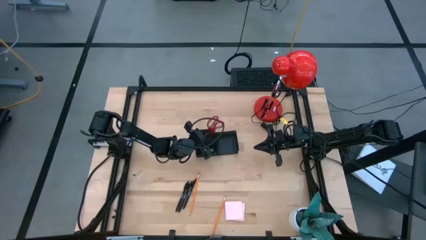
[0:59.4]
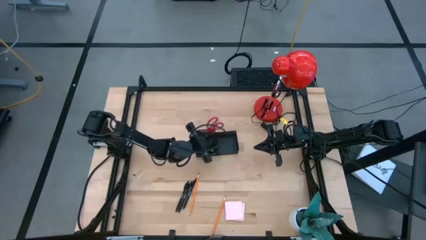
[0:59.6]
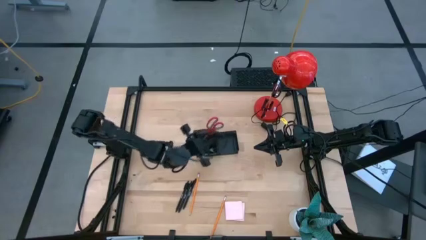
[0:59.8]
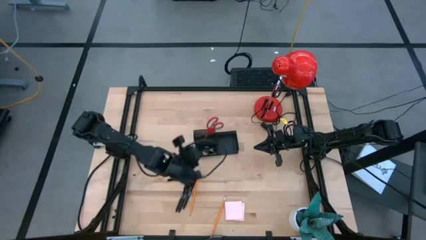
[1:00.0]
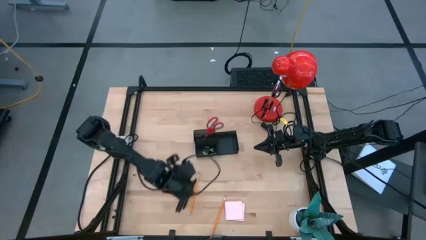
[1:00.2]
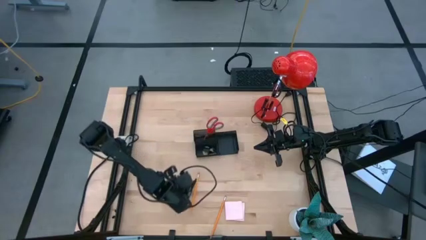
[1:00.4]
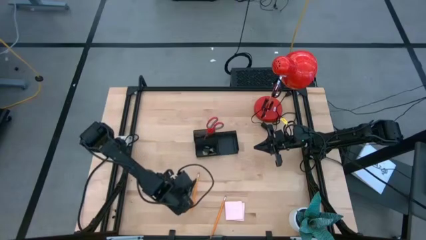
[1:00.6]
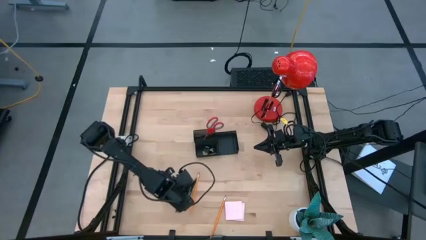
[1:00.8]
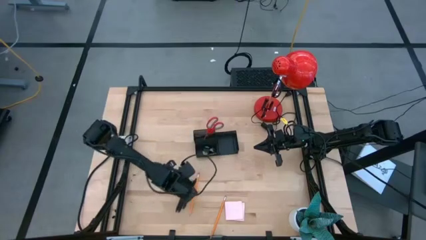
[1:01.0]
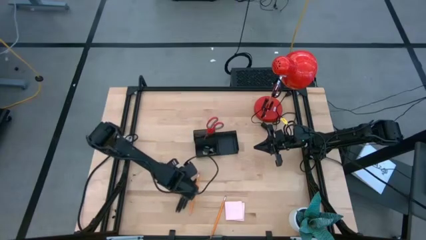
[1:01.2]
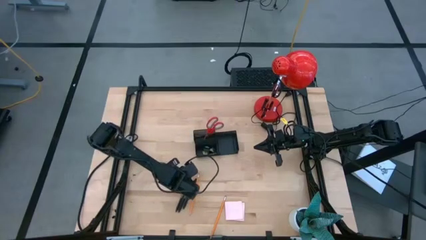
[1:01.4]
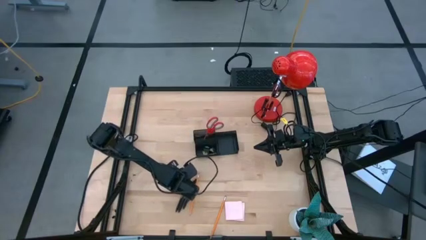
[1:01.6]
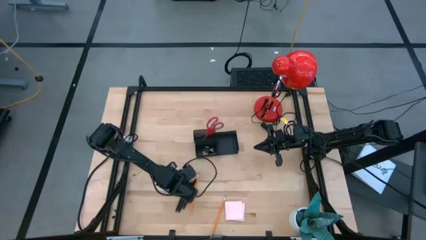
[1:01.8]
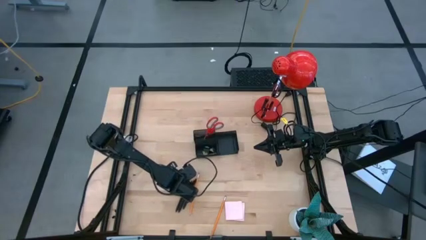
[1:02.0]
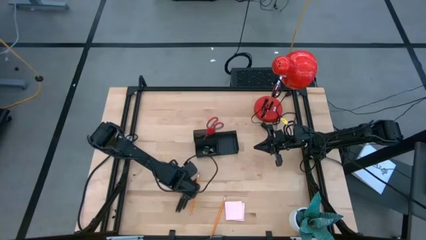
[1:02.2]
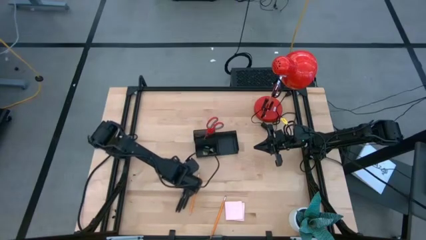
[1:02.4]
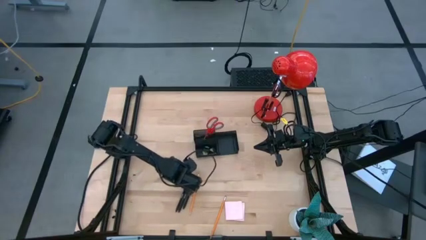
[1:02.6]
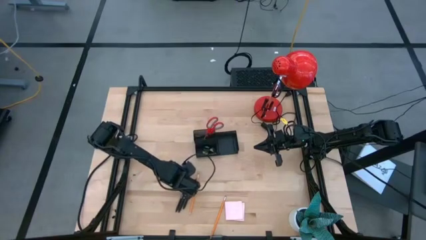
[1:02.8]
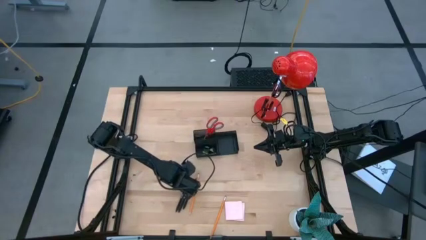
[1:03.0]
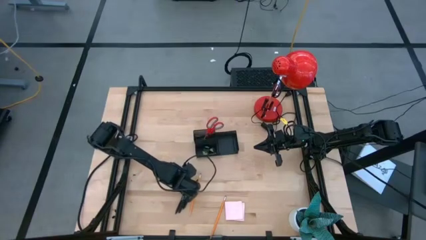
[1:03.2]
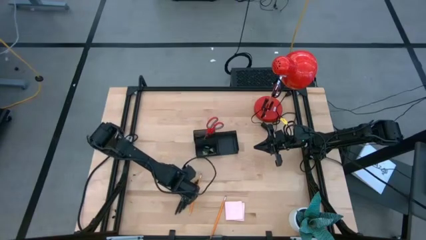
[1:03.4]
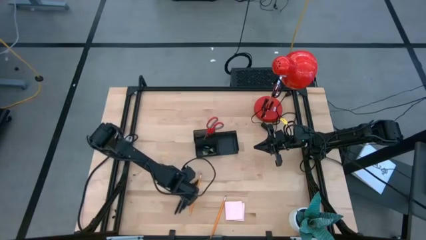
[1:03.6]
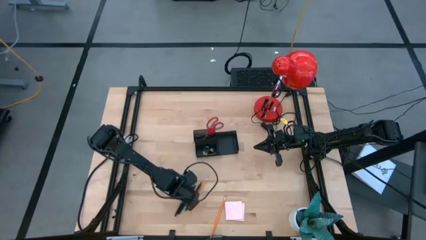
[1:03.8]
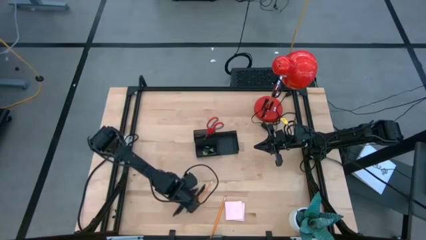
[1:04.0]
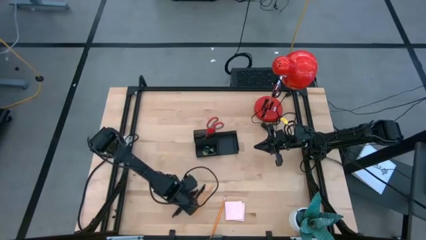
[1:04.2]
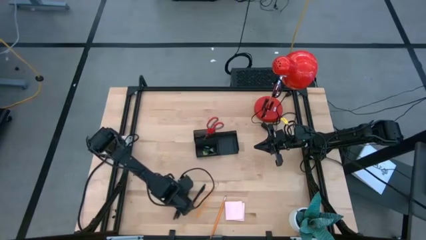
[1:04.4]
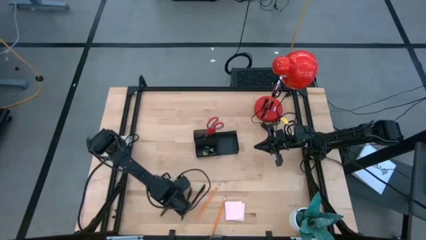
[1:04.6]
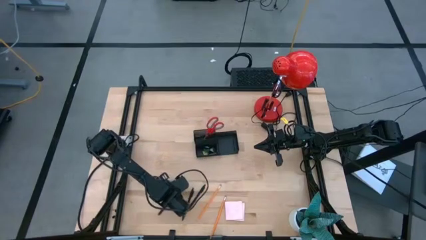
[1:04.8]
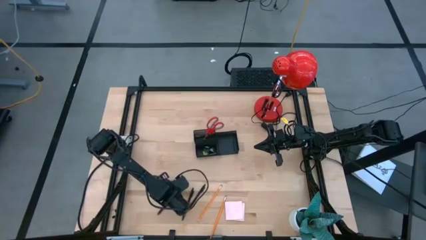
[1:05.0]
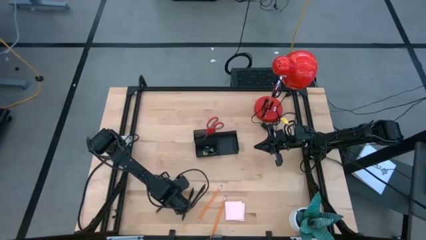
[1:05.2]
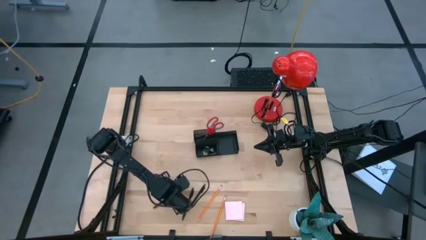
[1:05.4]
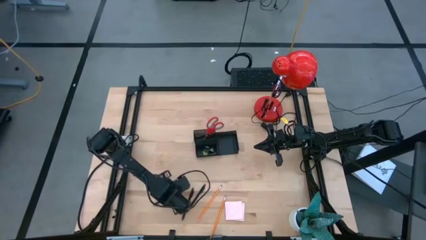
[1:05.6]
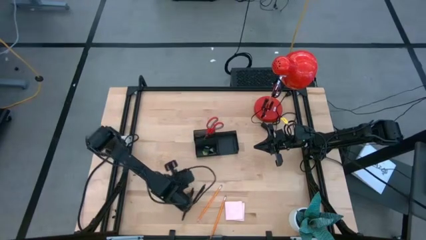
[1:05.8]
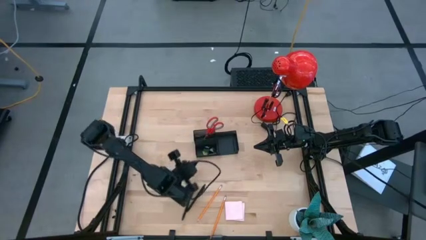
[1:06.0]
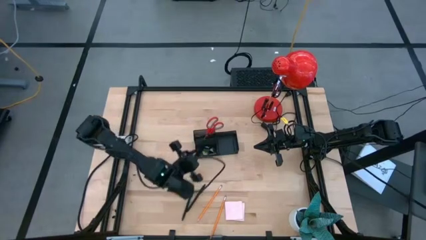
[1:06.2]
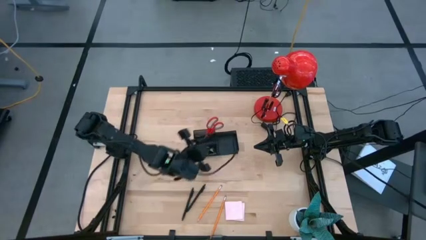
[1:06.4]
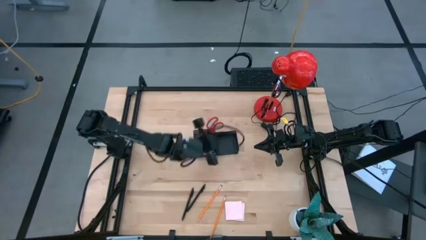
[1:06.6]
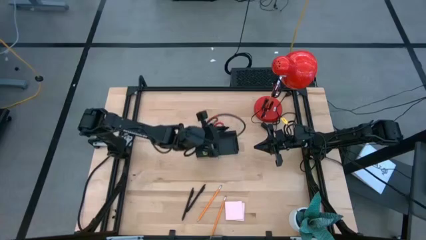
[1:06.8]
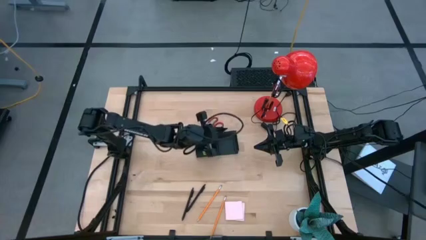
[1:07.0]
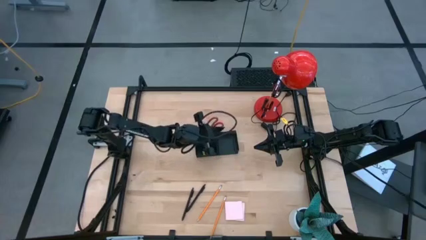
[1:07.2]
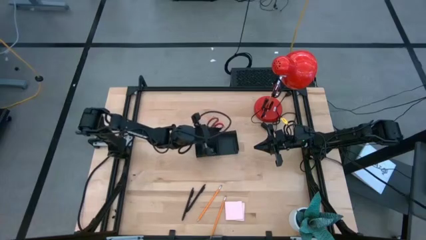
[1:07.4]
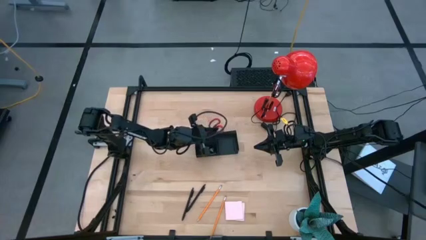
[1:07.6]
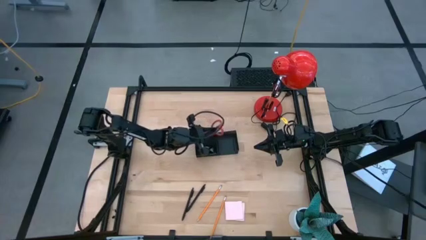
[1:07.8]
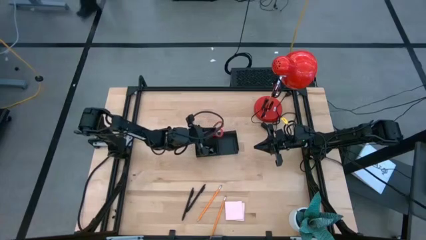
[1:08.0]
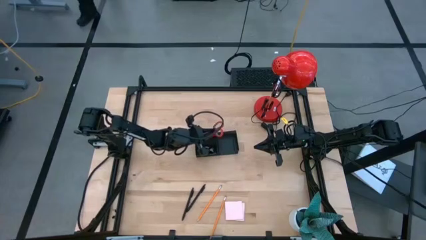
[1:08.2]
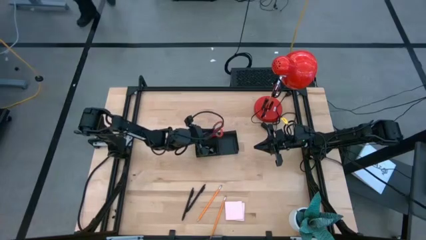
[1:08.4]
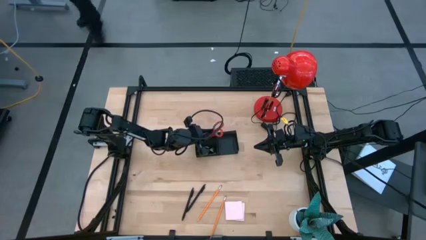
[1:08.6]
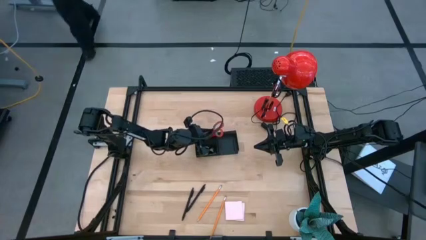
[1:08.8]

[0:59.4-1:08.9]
Task: Pick and place office supplies into organizer
Put the left pen into the desk organizer

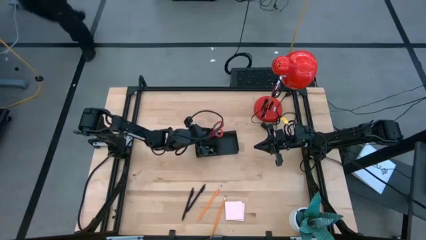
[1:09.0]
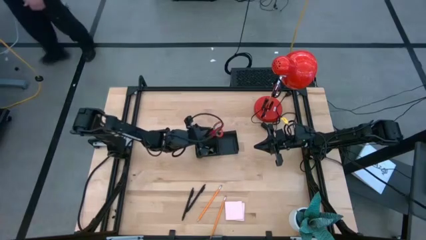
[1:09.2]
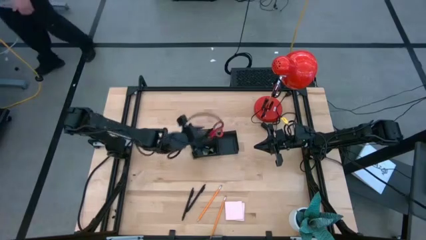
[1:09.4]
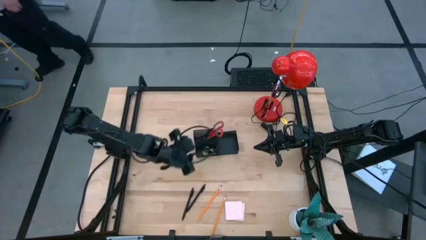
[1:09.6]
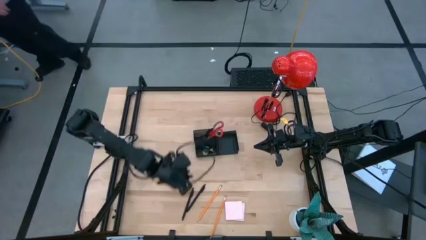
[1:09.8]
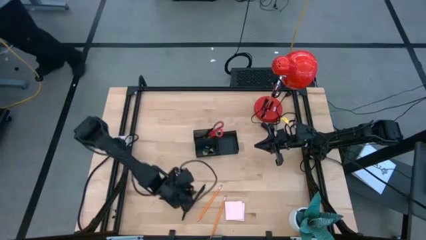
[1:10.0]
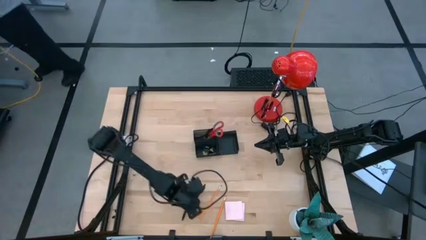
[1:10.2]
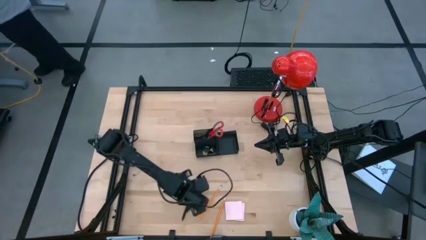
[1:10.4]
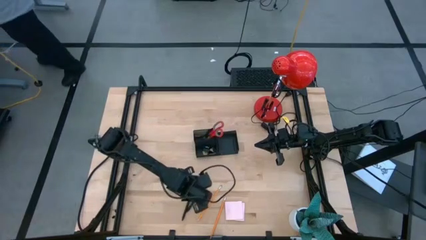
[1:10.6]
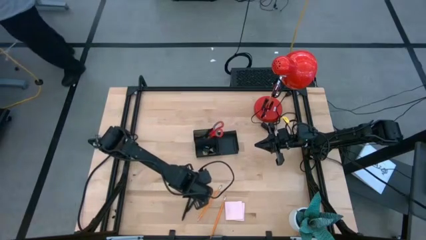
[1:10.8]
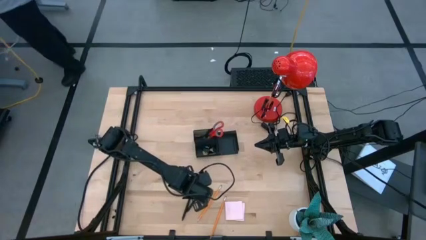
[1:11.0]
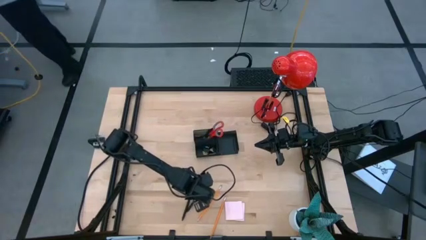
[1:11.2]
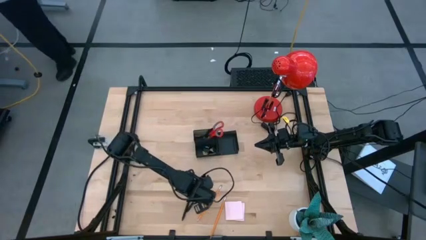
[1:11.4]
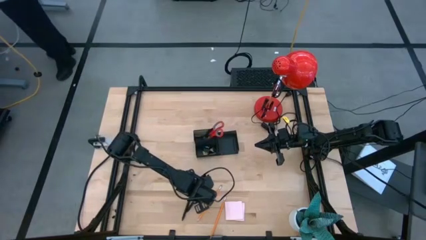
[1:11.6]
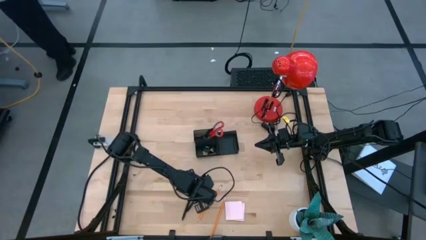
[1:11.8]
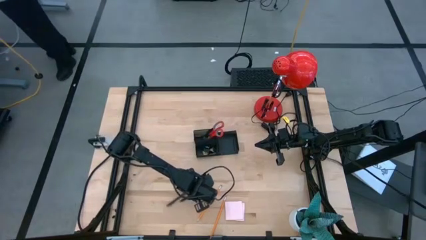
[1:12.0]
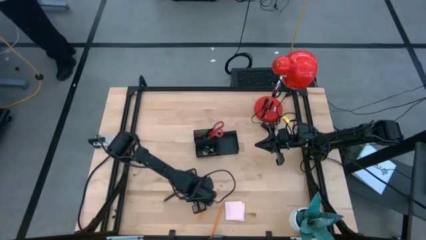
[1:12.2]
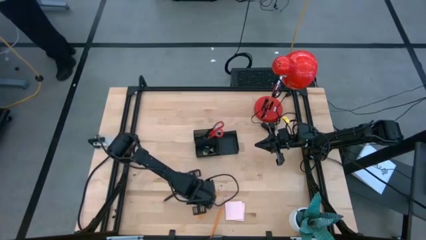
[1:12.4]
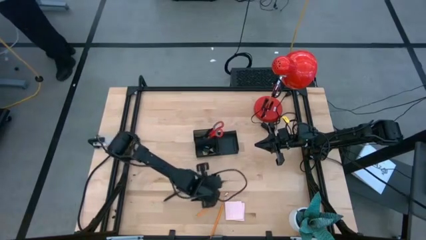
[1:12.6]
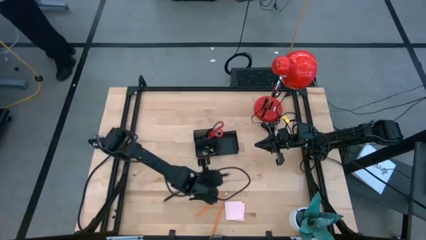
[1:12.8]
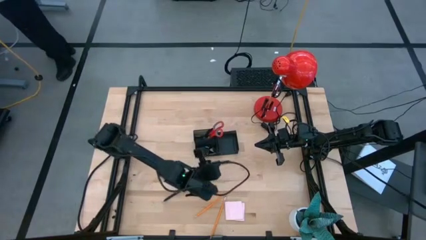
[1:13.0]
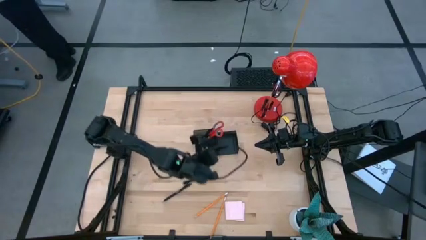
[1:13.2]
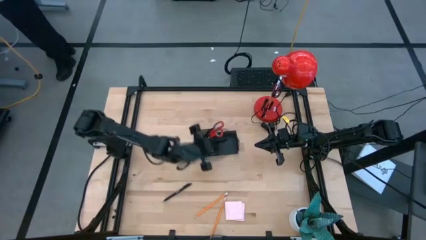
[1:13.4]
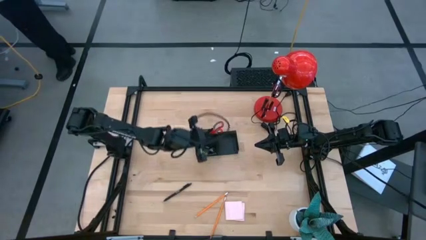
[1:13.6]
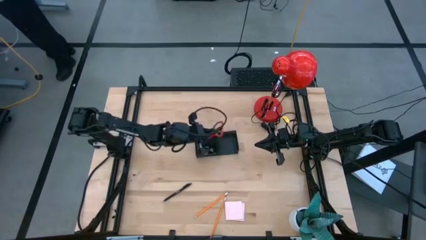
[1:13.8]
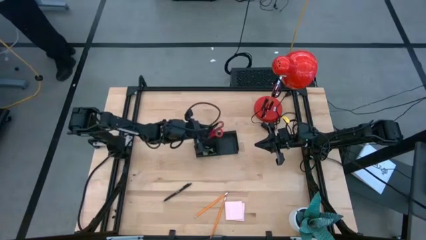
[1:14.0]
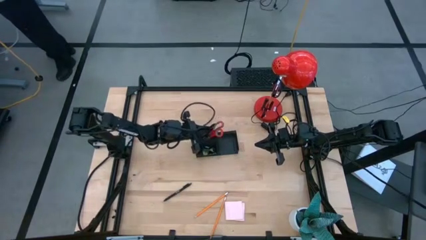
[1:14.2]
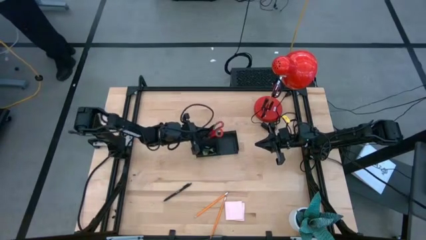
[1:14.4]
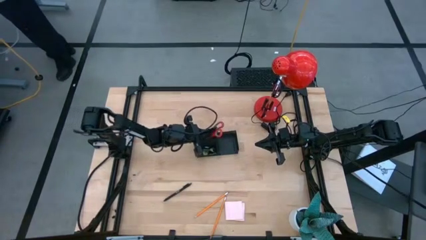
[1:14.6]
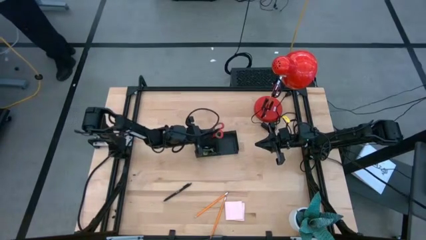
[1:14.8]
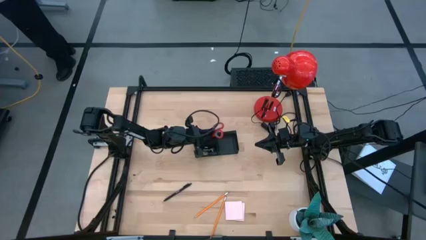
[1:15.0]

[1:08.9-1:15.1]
Put the right pen into the desk organizer
